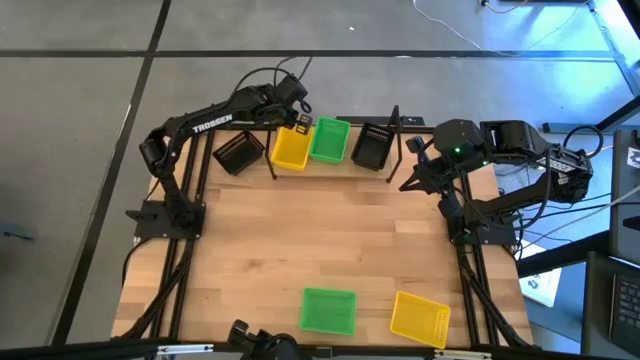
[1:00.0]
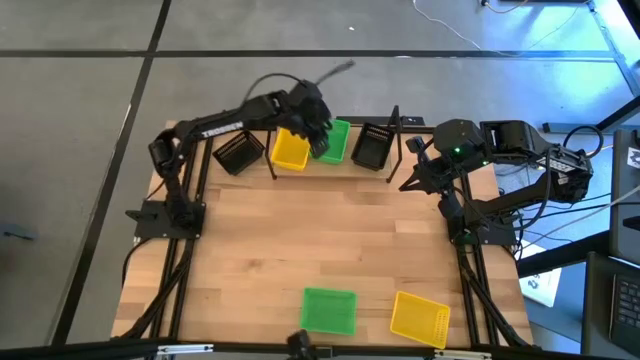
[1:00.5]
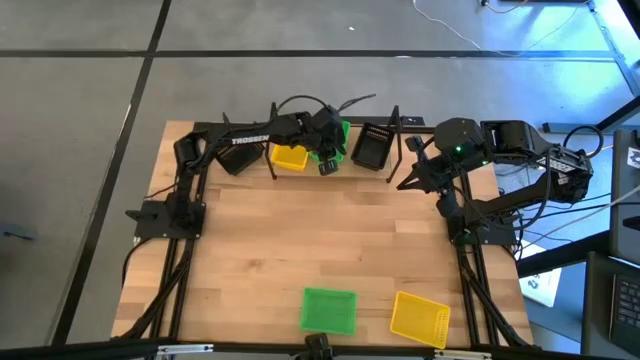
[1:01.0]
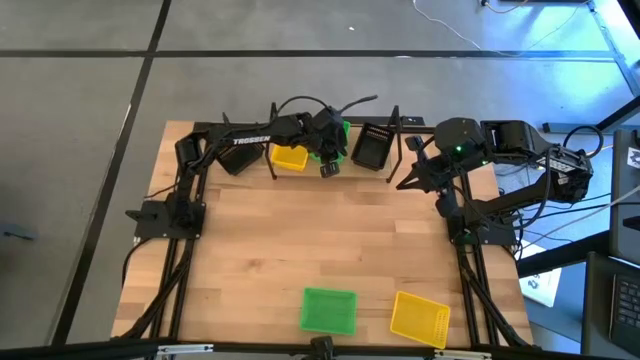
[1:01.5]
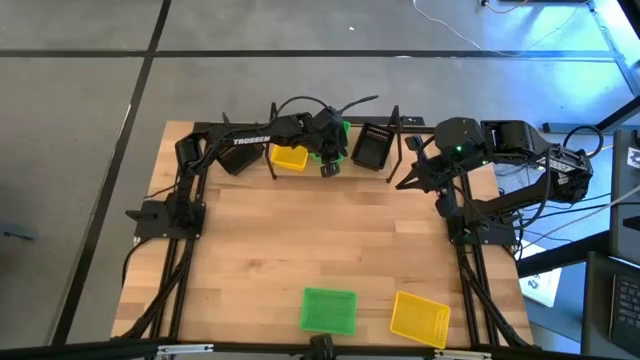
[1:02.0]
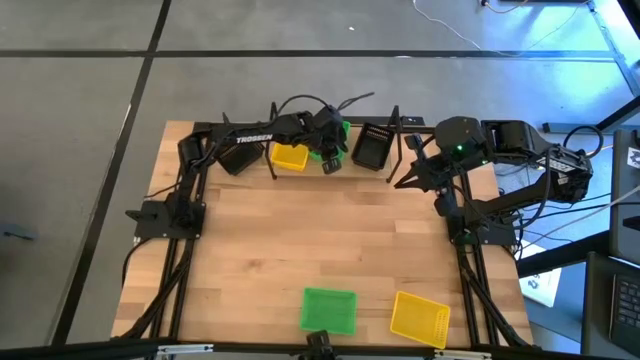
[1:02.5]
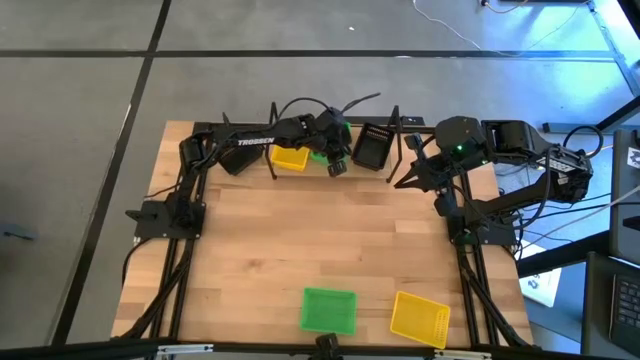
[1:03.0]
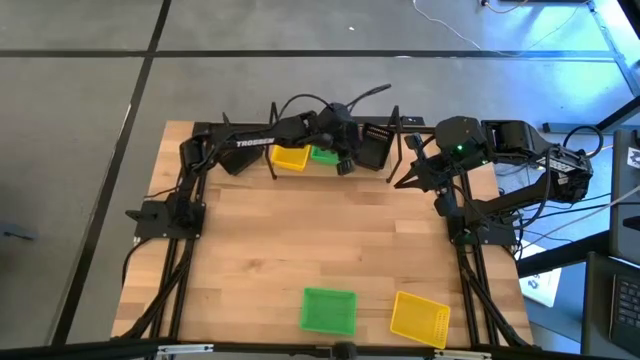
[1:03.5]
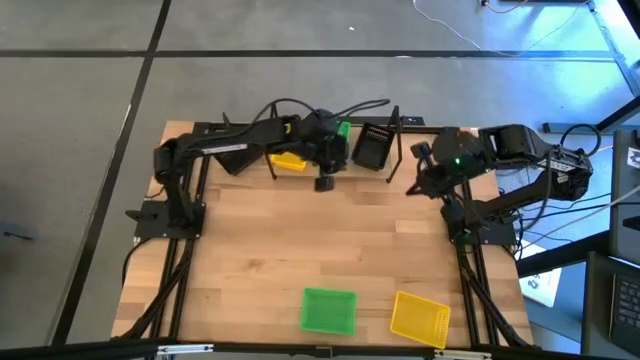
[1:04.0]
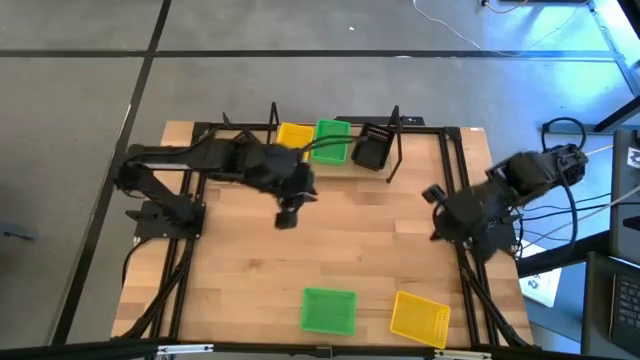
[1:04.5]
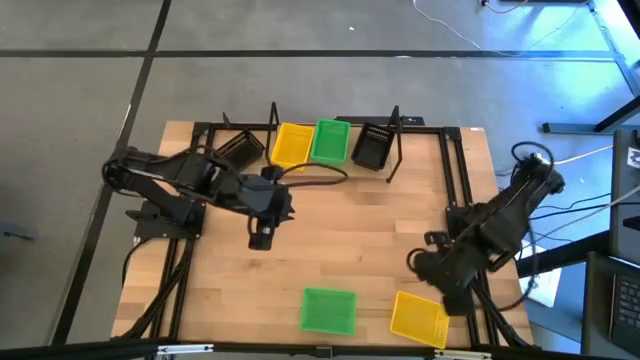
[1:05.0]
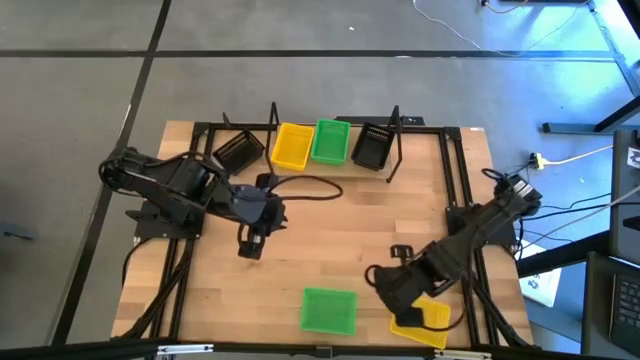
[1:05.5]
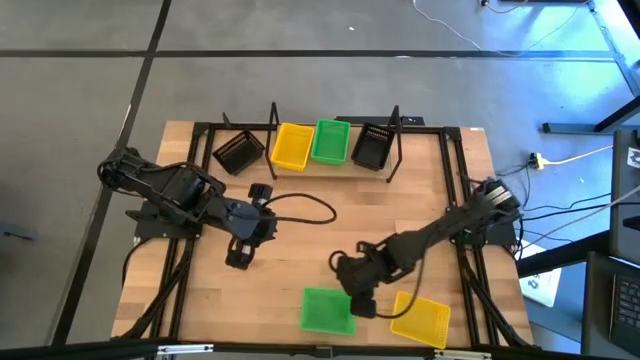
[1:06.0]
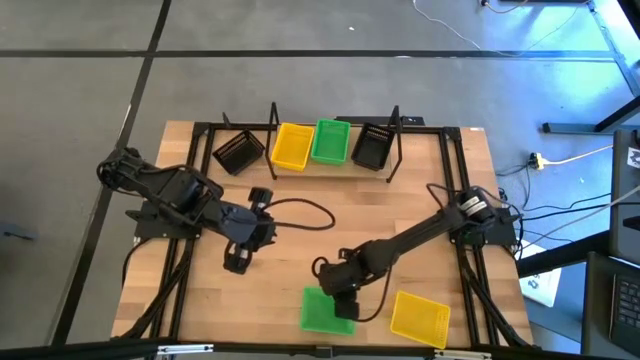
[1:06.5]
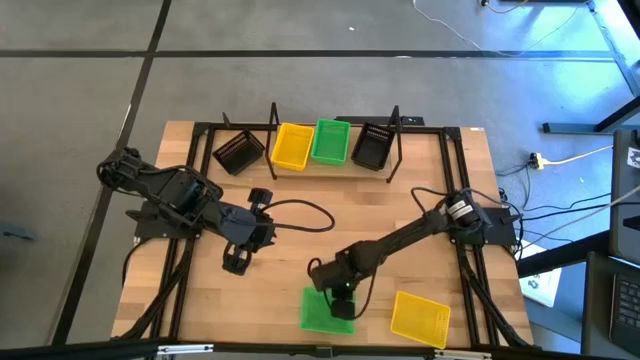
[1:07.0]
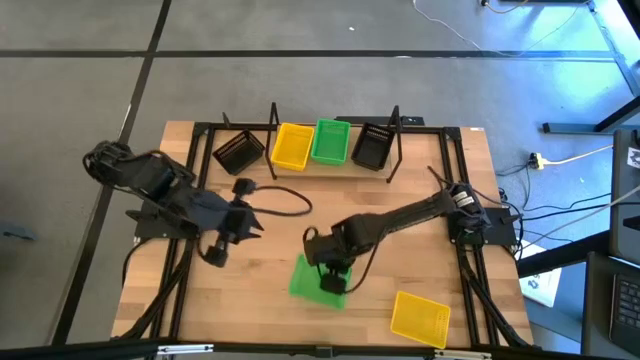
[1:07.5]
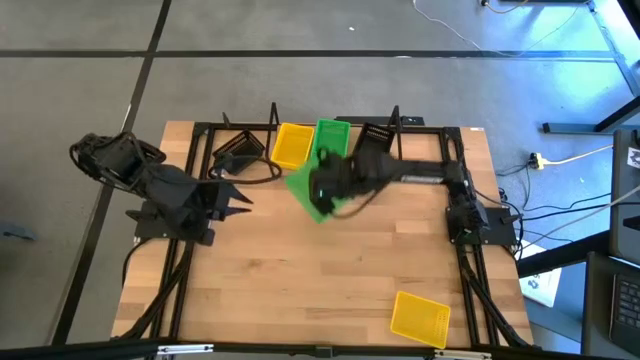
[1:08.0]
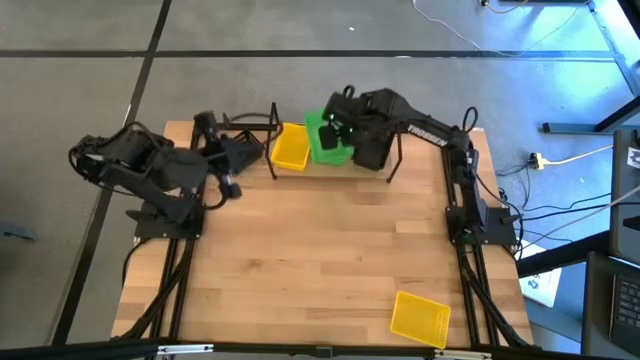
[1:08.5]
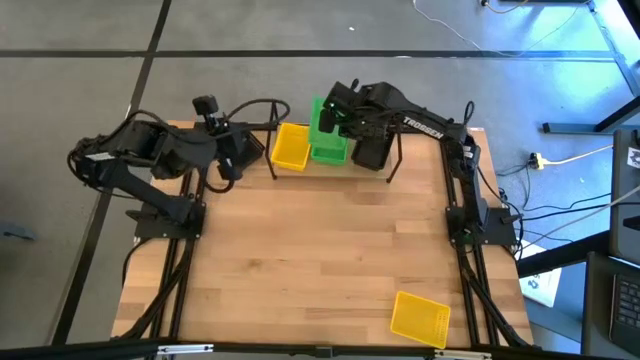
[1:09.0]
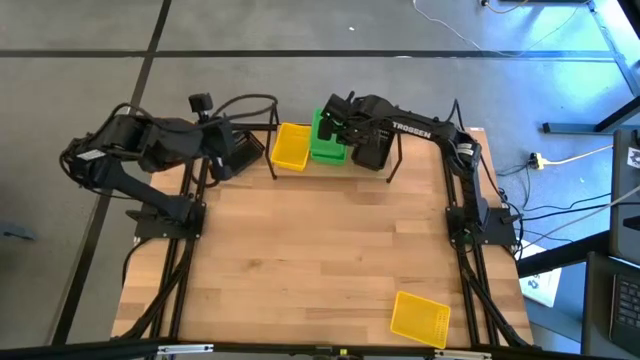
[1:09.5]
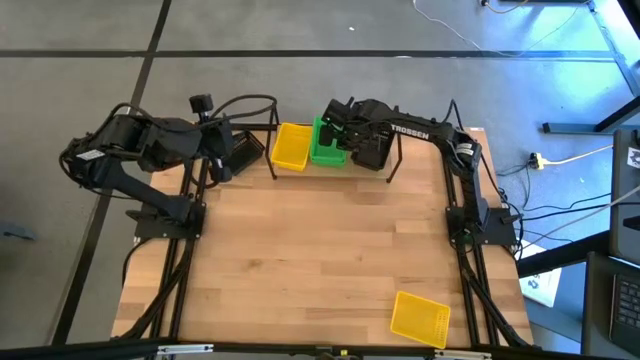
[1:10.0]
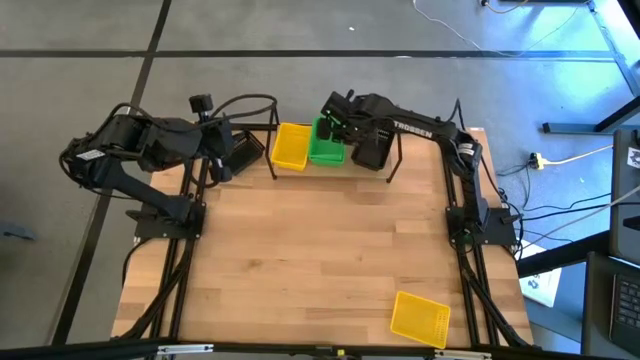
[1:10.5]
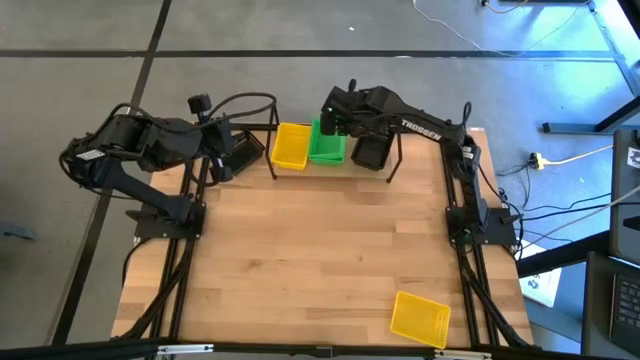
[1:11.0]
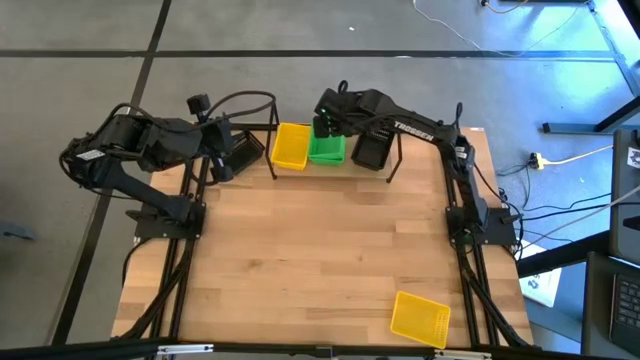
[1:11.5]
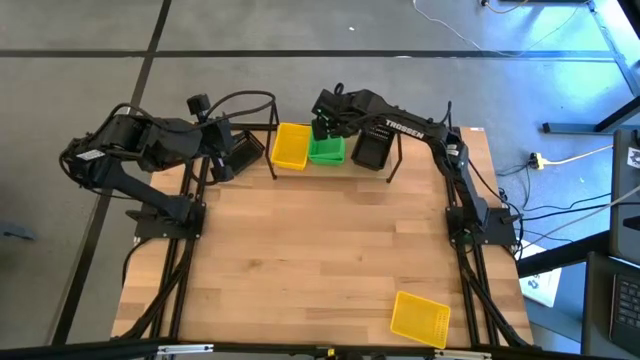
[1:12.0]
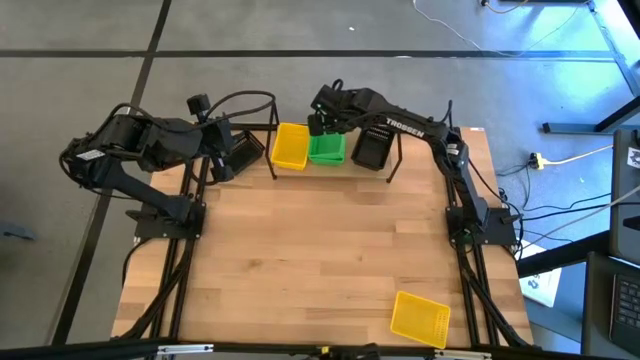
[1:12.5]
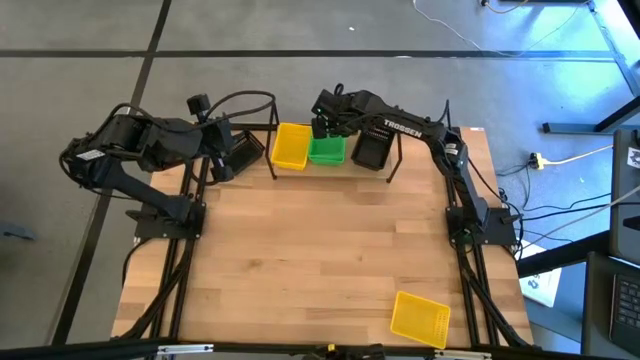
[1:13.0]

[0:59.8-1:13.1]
Task: Stack baskets on shelf by color
Stack the green bin on top of the green bin on the shelf

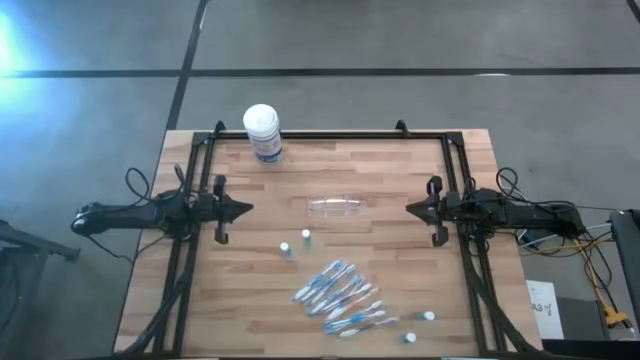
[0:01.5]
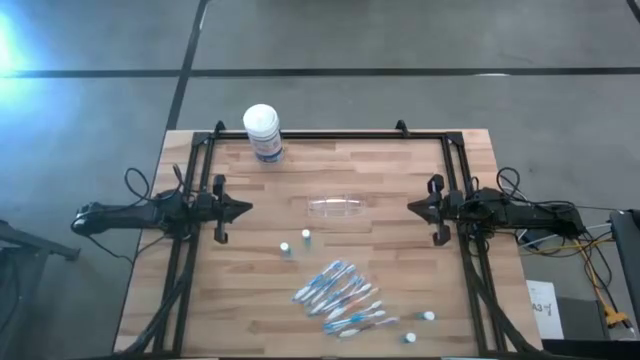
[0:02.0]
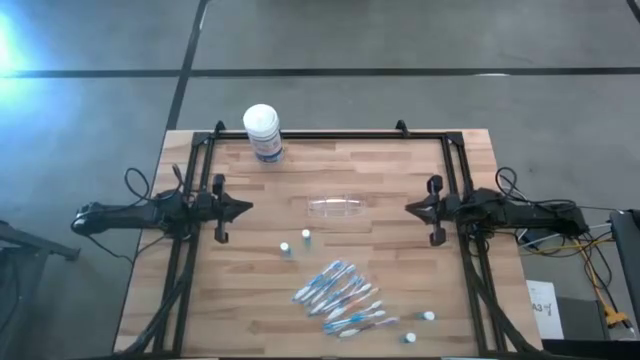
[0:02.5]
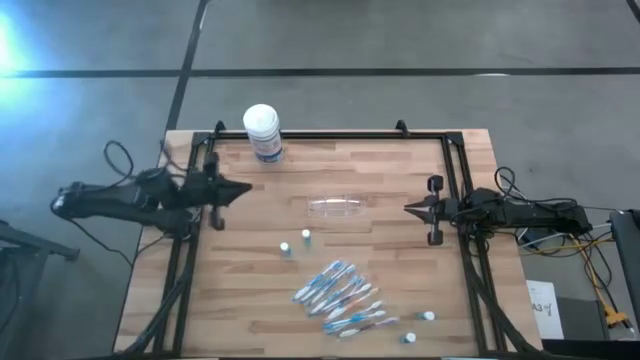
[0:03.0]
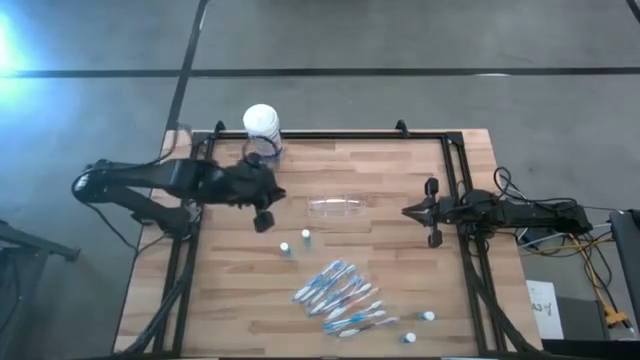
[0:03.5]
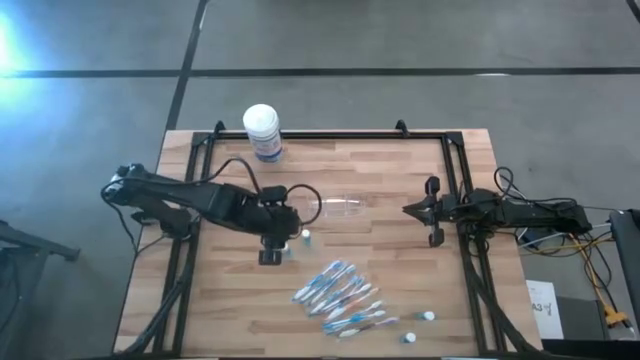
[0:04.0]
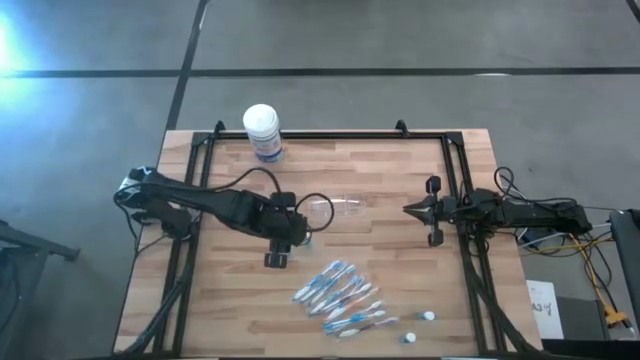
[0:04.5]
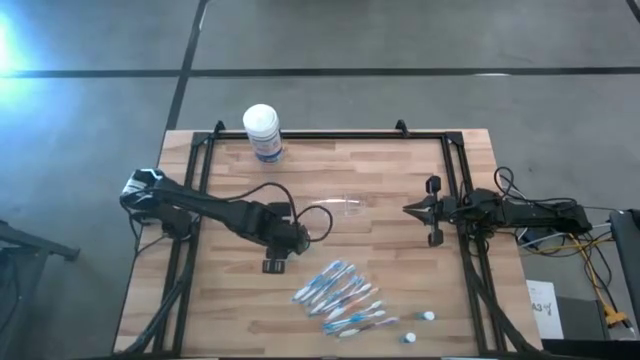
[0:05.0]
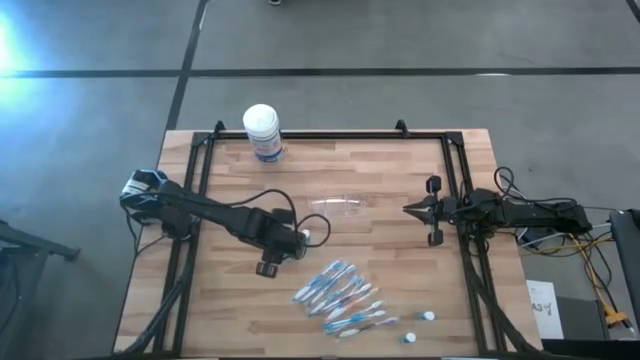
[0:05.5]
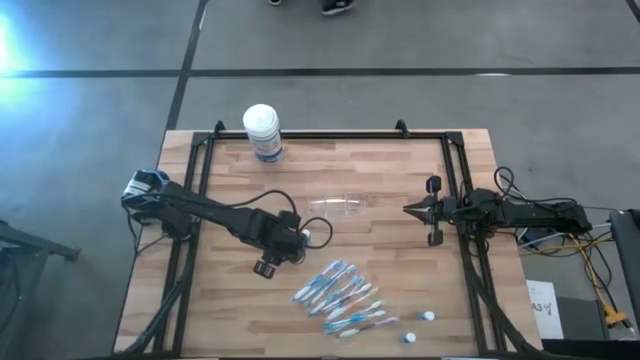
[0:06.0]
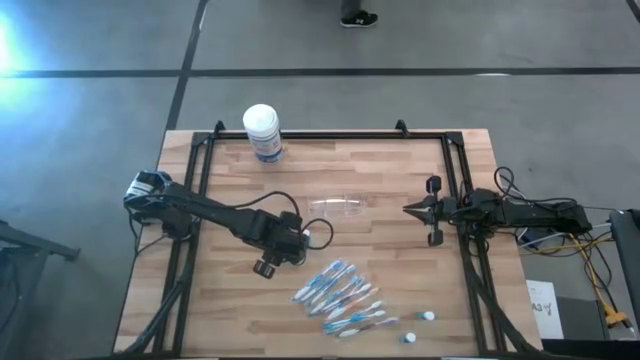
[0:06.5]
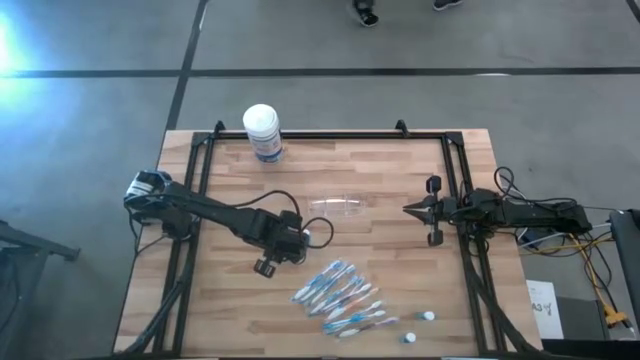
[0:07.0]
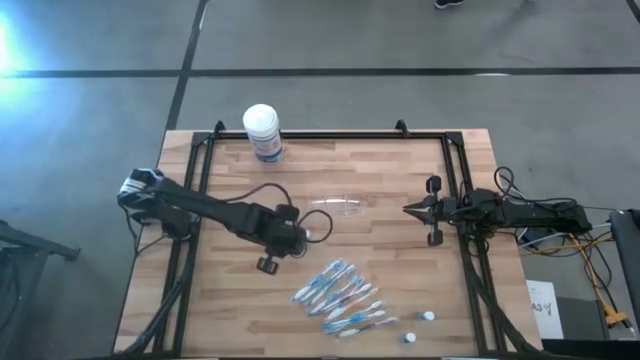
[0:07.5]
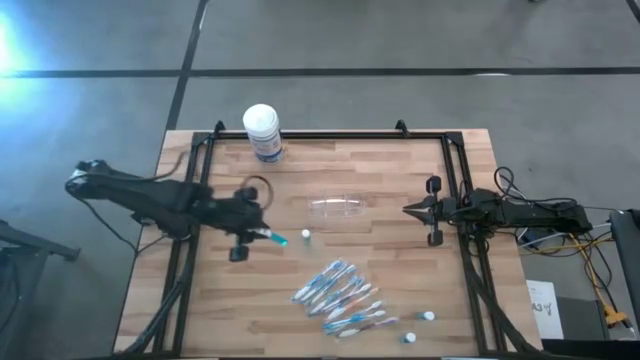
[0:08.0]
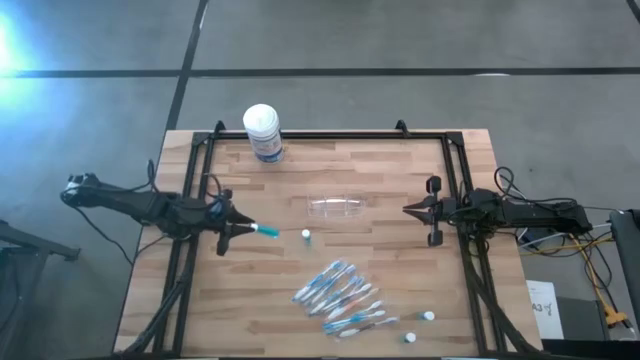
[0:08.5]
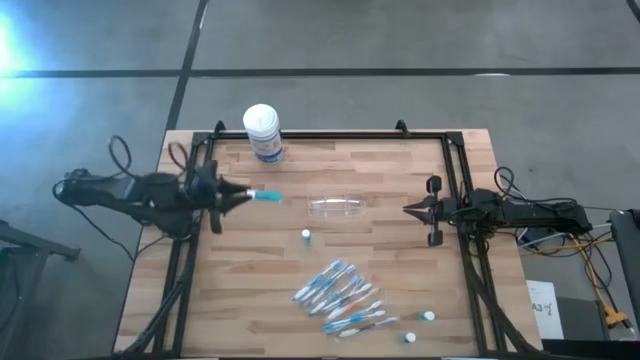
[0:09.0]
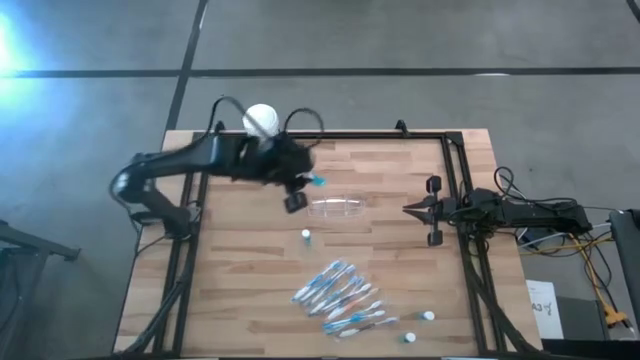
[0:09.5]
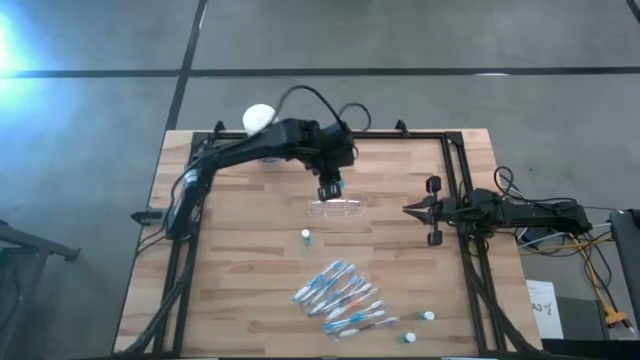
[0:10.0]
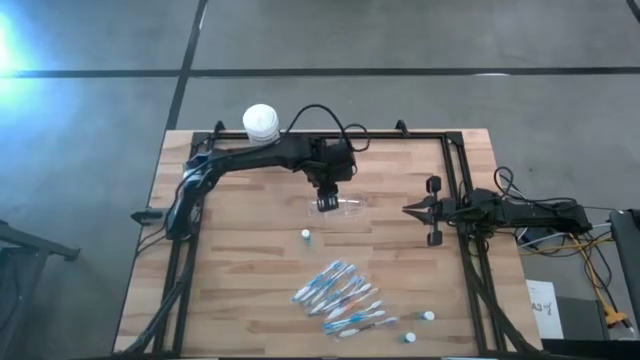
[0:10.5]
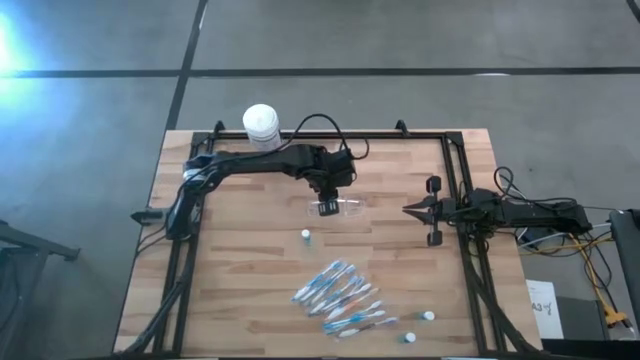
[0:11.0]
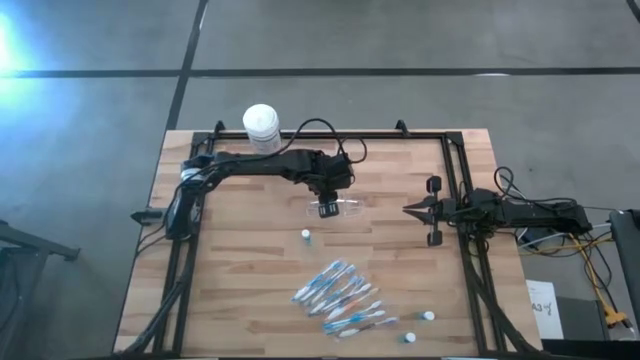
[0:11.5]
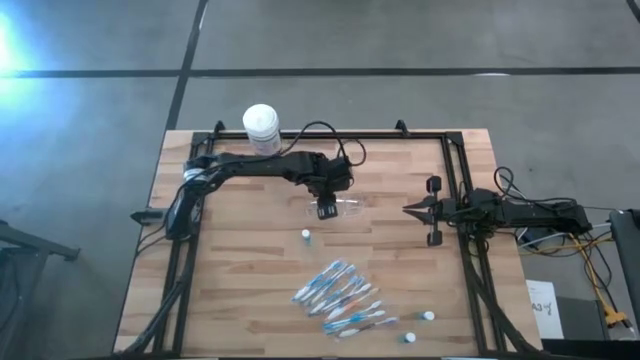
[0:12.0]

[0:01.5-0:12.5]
Task: Pick & Place toothbrushing station
Put the mouthwash into the transparent organizer
